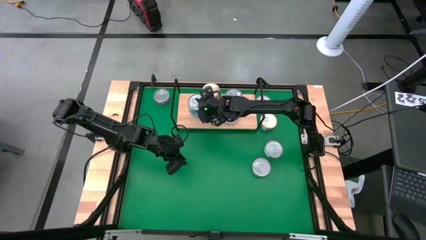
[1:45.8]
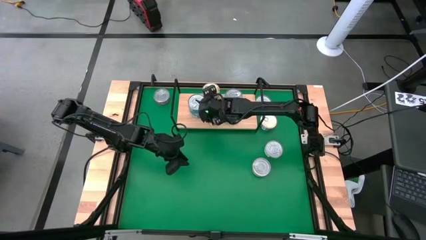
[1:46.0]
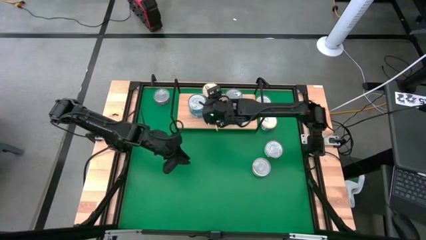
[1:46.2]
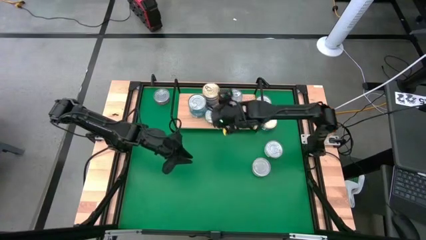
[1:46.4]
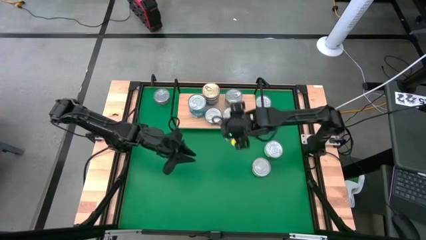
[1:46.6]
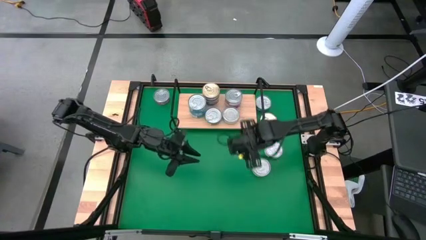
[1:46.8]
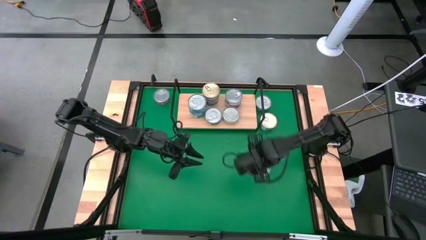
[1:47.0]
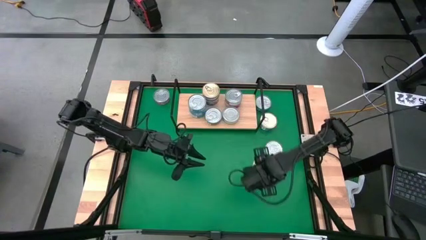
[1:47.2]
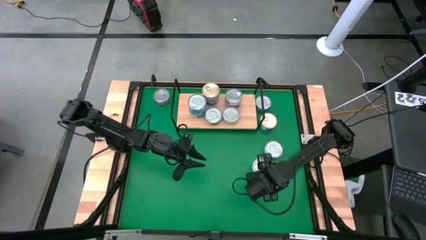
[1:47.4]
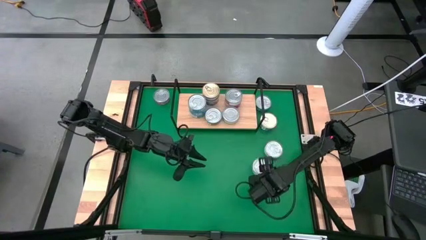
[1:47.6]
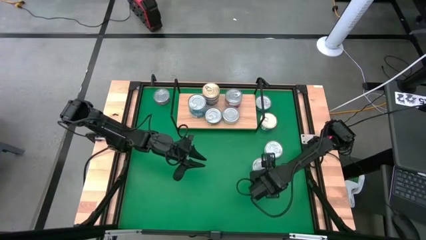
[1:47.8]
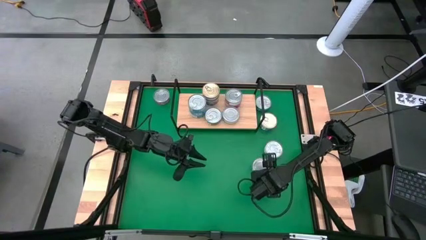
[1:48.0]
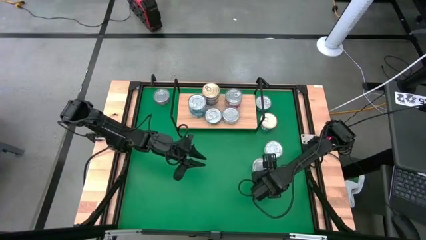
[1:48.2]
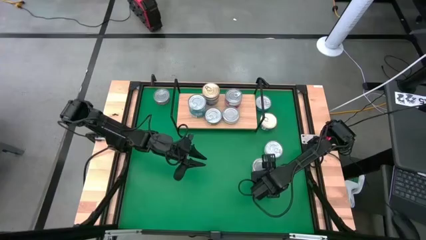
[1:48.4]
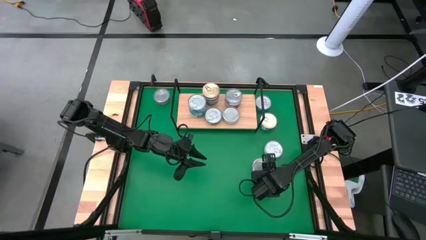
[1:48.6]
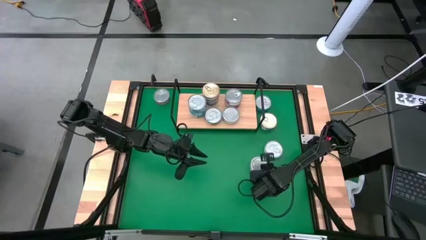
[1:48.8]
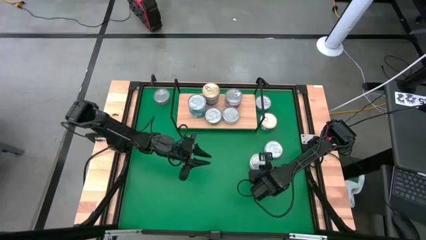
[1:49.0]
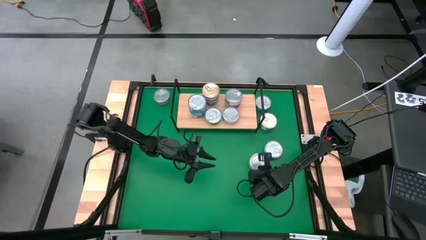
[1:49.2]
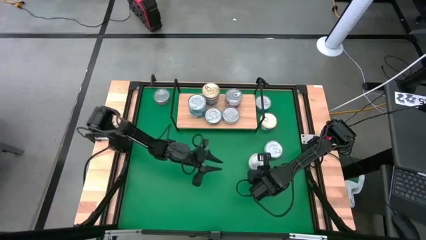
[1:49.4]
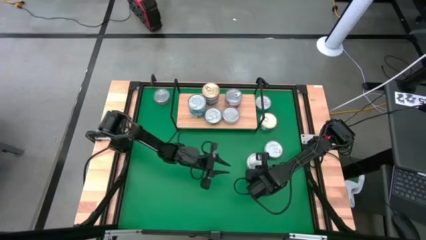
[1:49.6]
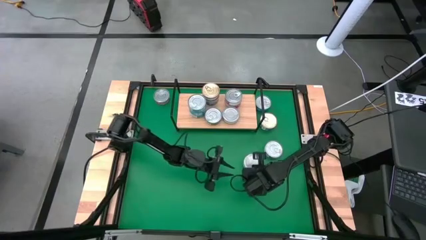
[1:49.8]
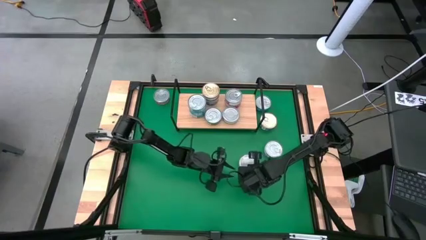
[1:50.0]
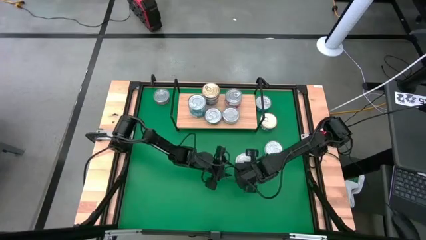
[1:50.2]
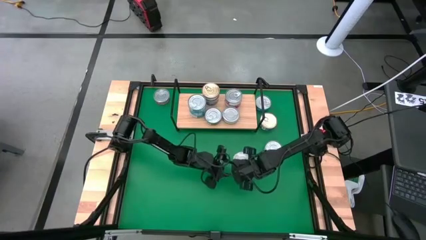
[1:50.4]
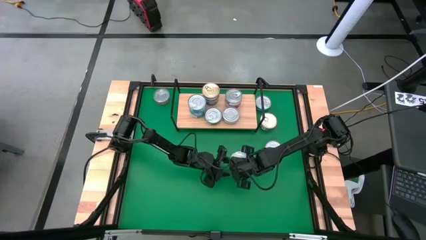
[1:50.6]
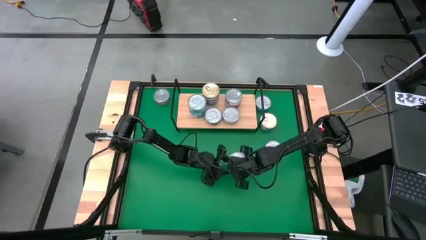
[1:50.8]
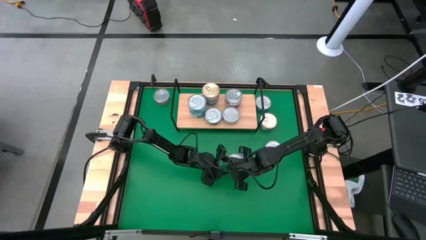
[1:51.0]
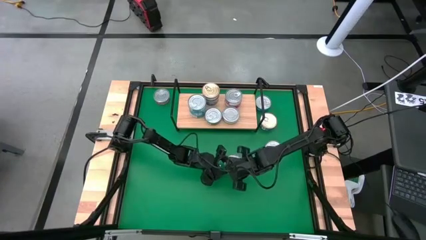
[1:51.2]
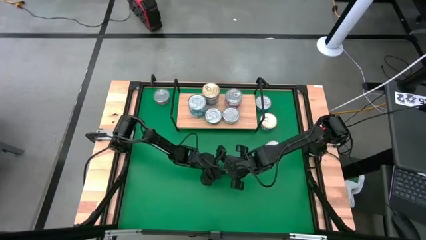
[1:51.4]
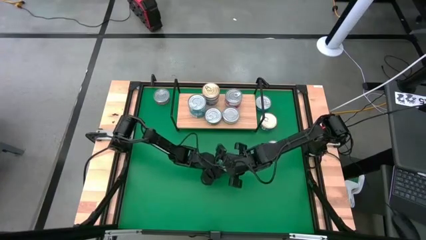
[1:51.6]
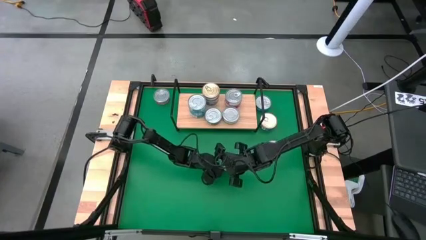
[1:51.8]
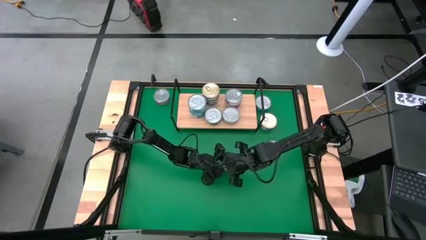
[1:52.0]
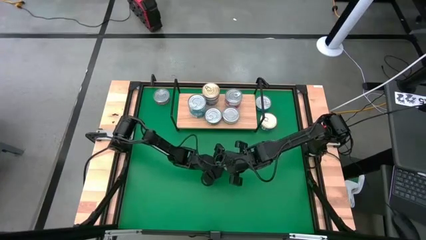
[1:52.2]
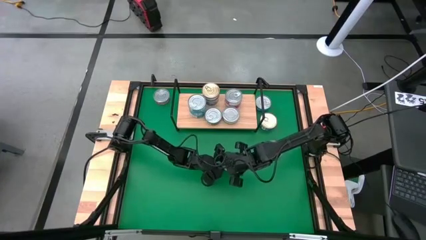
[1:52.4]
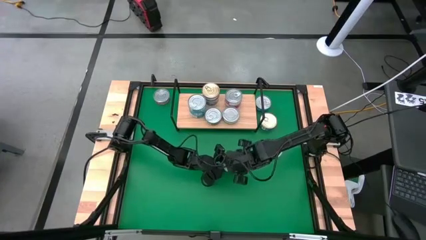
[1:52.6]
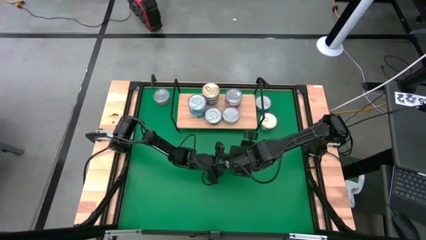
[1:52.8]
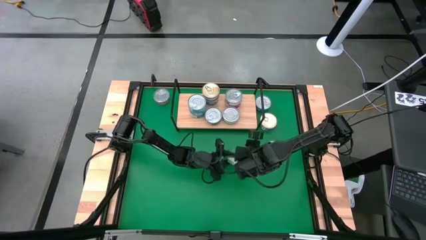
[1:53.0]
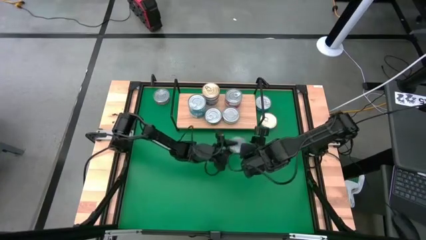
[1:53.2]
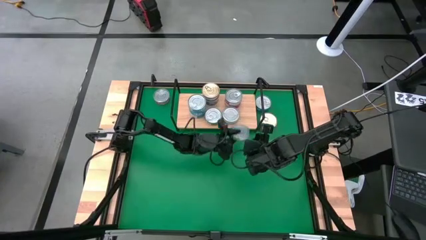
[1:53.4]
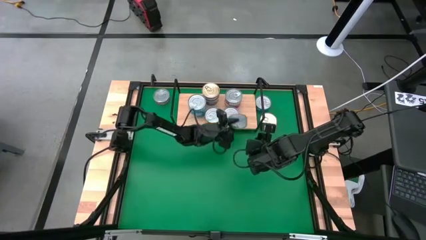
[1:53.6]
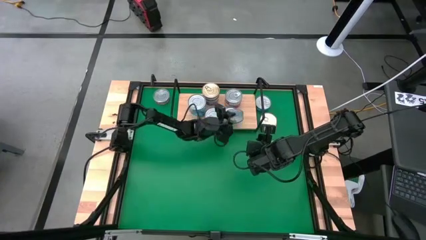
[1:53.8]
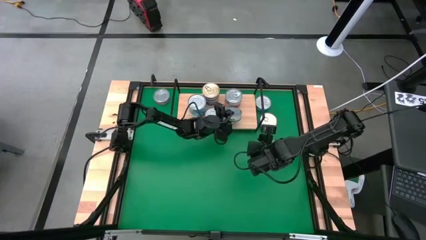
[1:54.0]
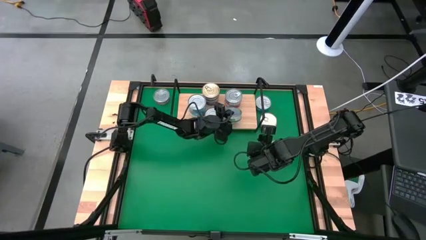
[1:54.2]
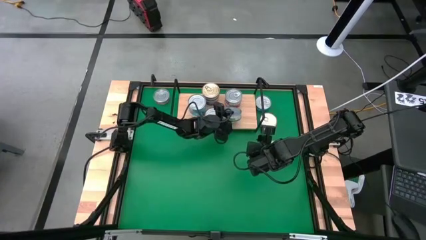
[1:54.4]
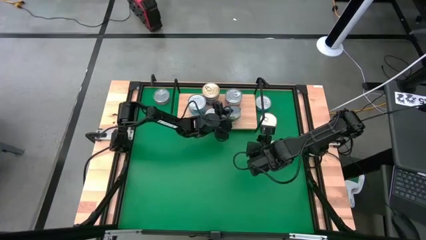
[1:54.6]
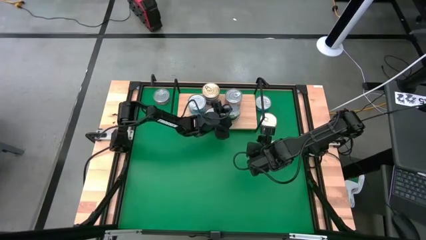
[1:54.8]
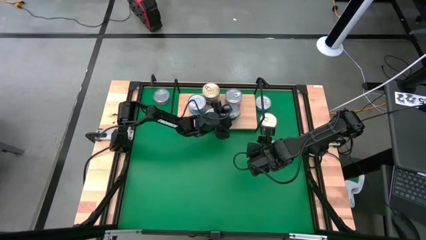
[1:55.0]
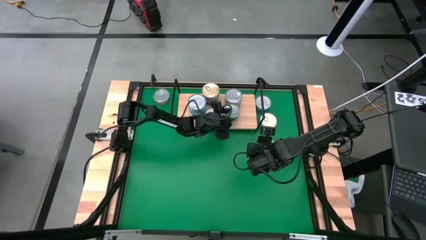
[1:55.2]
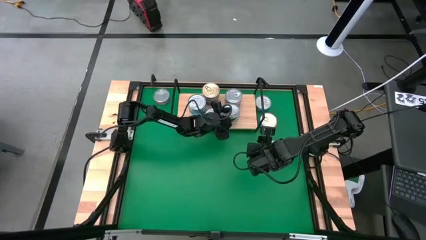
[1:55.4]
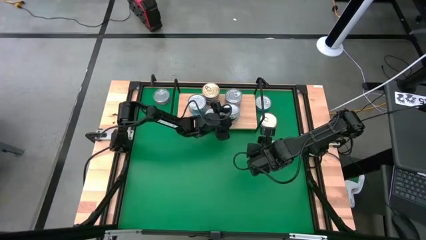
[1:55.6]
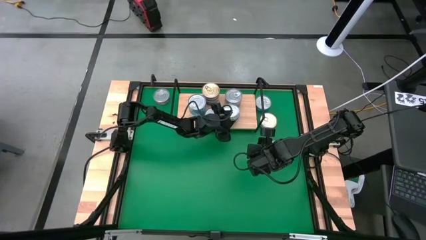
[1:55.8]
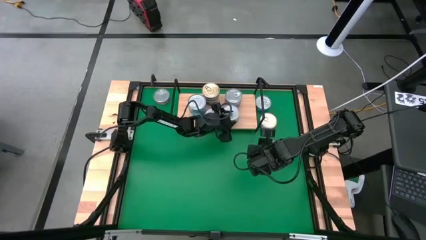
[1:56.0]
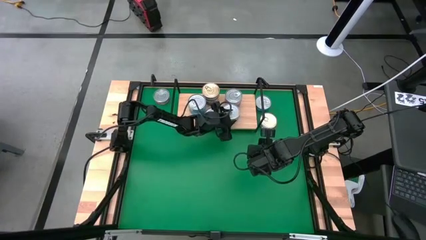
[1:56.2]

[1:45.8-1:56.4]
Task: Stack canned seafood by type on shelf
Stack the green white tuna can on top of the green white tuna can on the shelf
